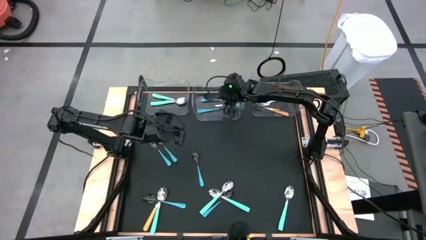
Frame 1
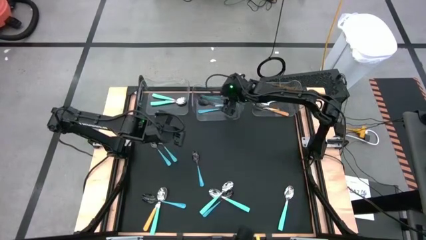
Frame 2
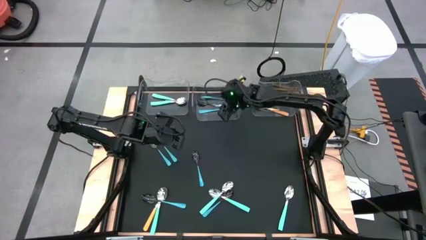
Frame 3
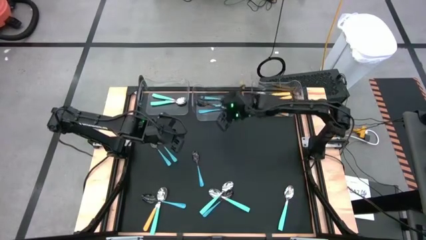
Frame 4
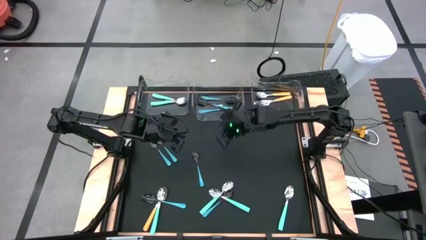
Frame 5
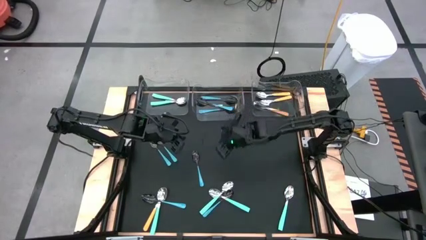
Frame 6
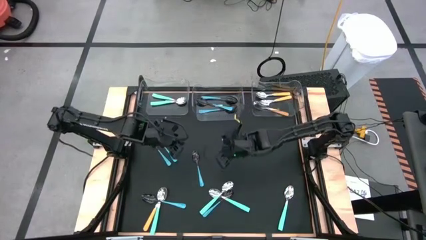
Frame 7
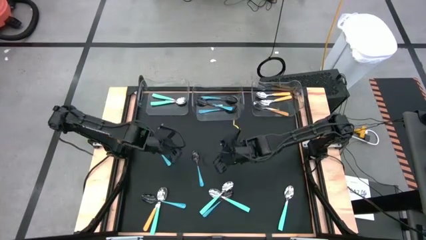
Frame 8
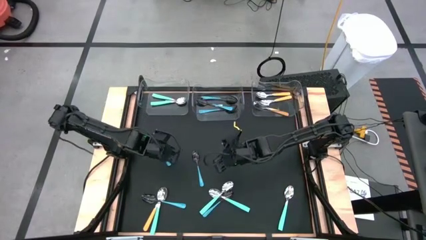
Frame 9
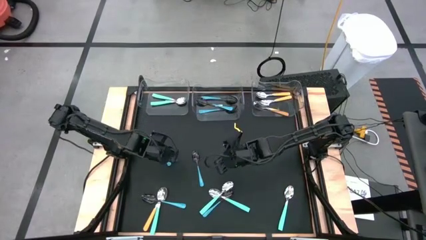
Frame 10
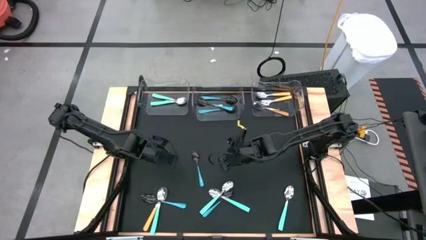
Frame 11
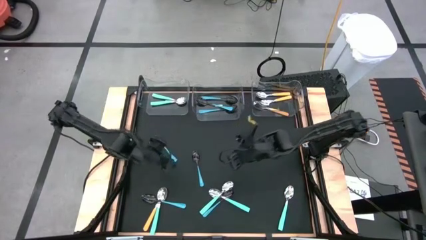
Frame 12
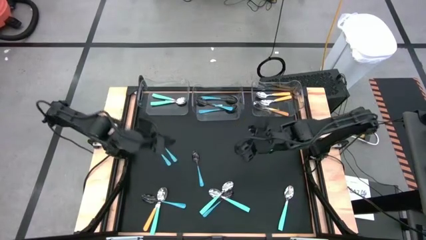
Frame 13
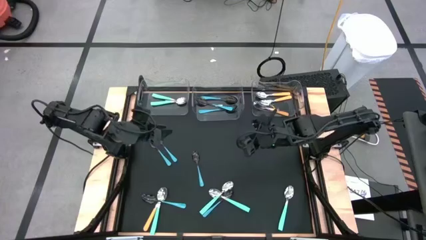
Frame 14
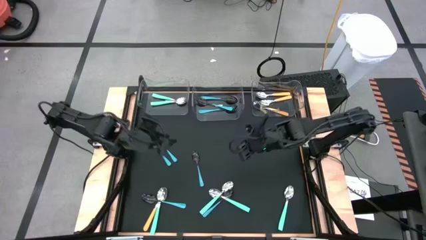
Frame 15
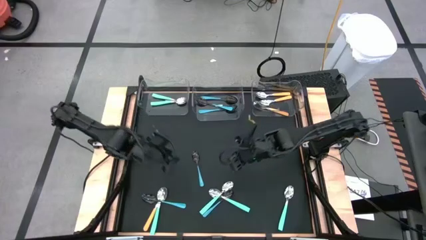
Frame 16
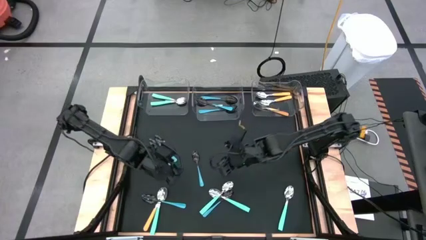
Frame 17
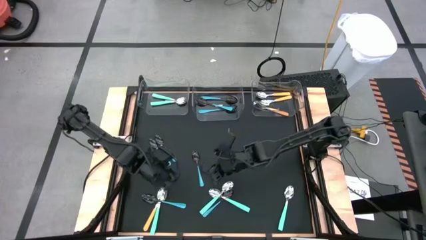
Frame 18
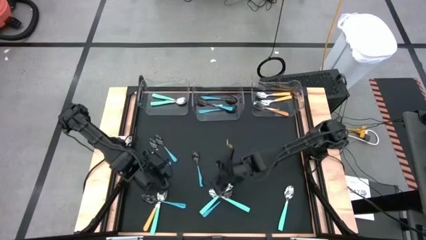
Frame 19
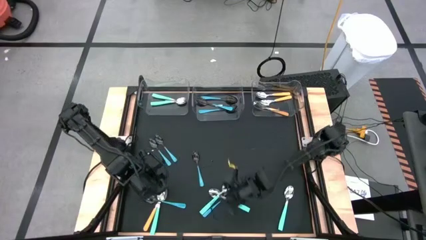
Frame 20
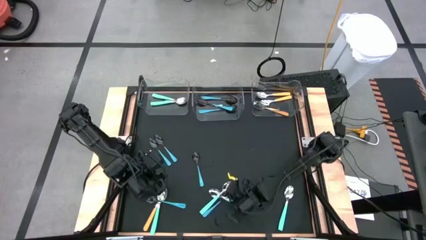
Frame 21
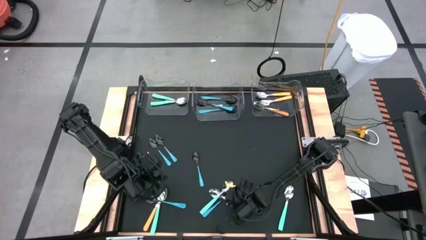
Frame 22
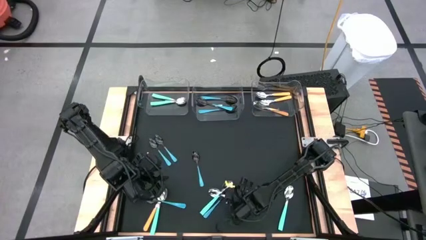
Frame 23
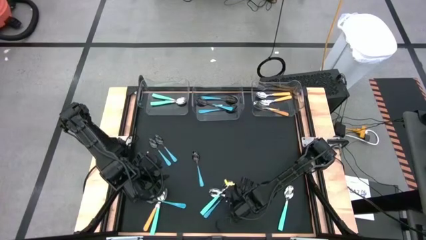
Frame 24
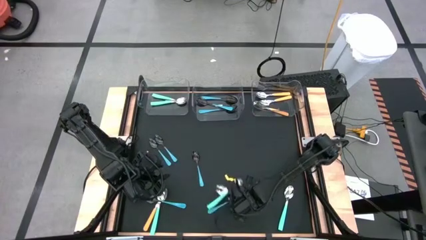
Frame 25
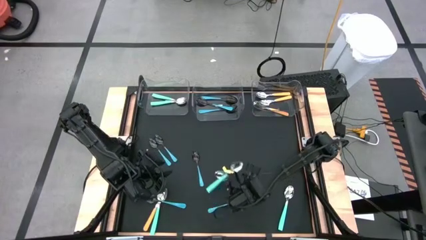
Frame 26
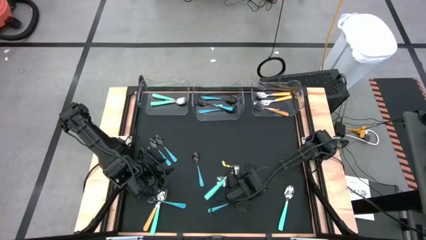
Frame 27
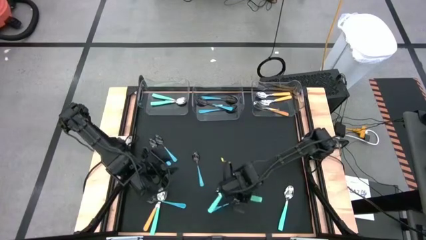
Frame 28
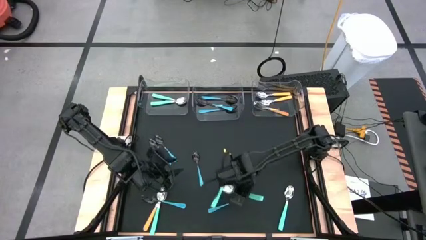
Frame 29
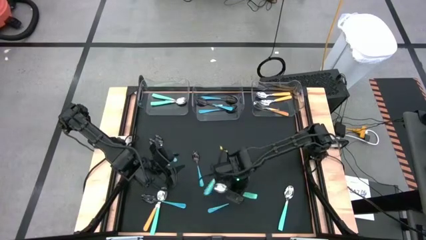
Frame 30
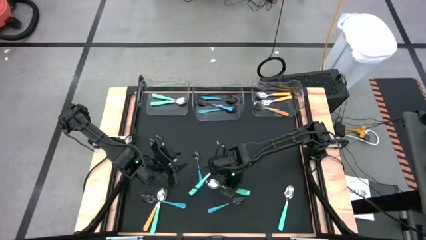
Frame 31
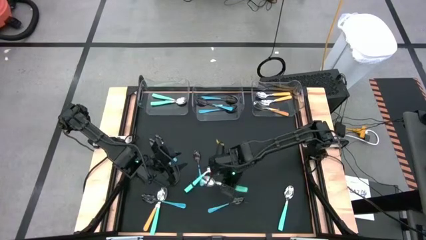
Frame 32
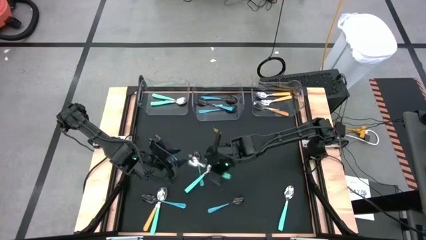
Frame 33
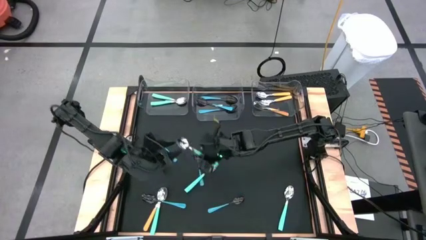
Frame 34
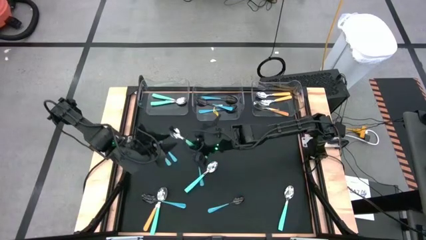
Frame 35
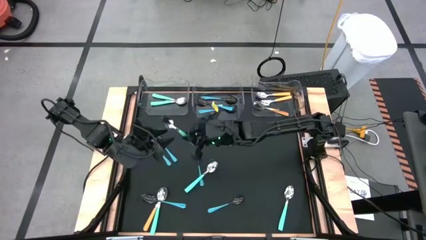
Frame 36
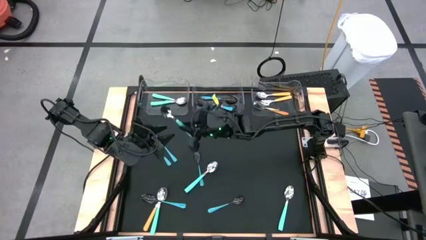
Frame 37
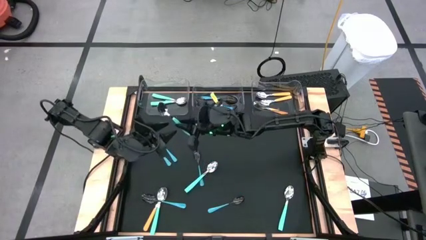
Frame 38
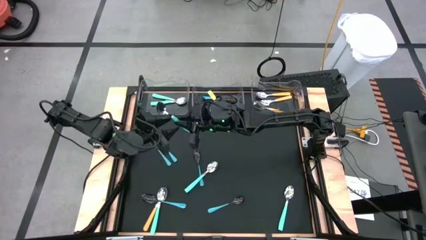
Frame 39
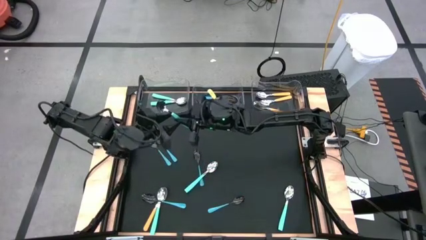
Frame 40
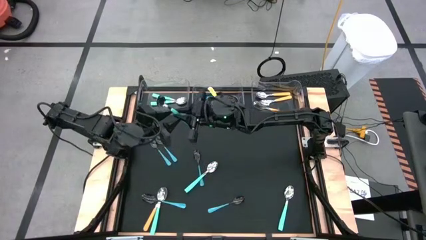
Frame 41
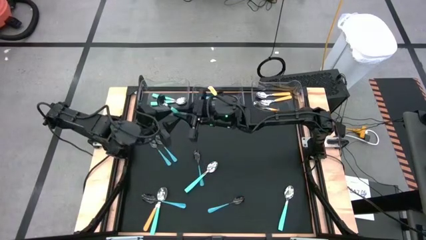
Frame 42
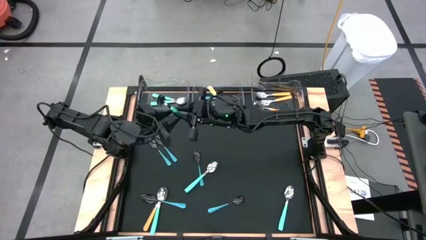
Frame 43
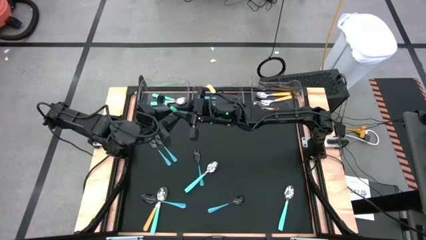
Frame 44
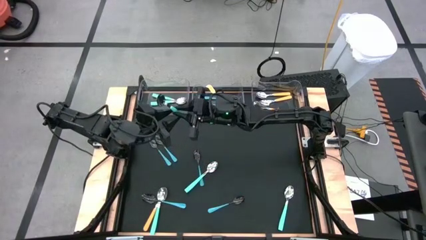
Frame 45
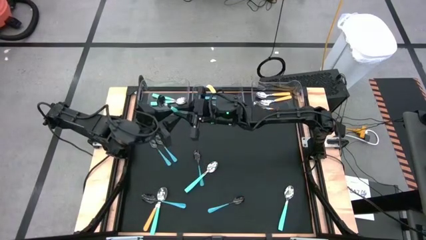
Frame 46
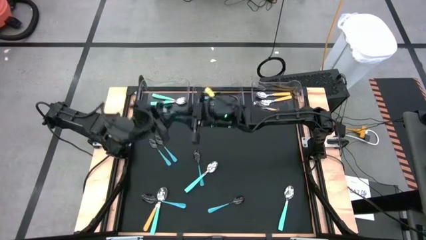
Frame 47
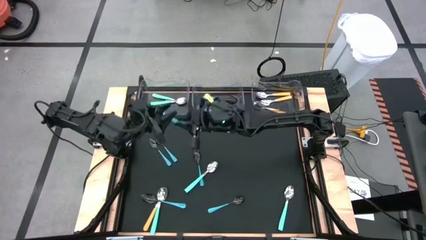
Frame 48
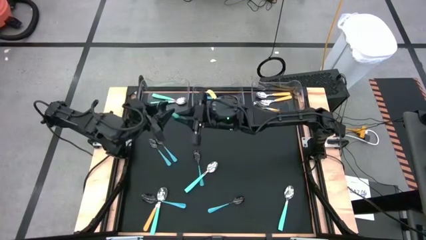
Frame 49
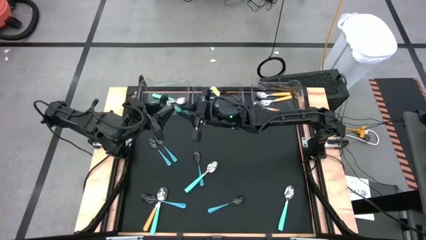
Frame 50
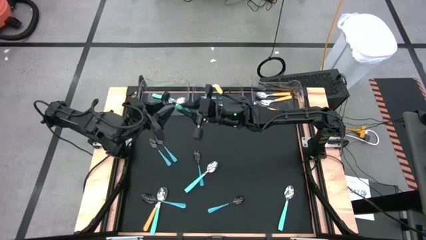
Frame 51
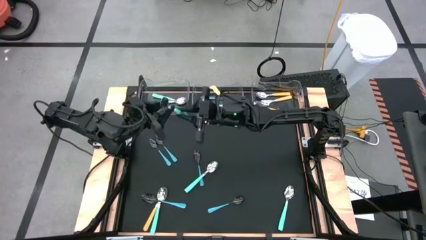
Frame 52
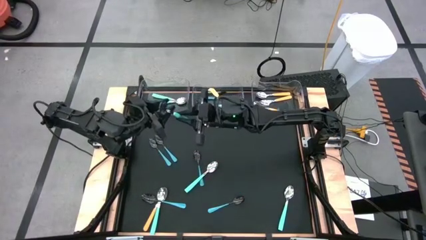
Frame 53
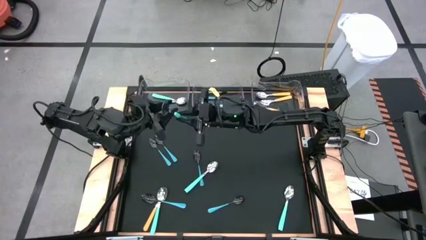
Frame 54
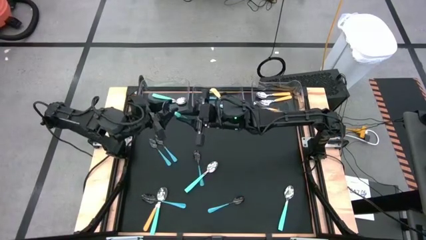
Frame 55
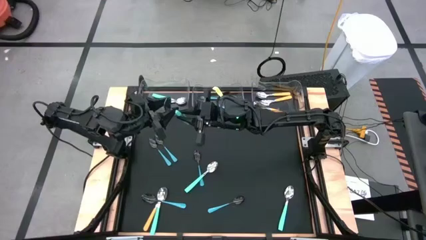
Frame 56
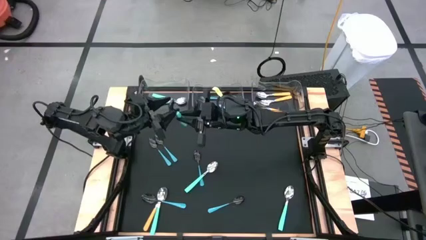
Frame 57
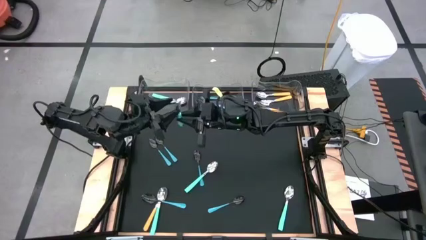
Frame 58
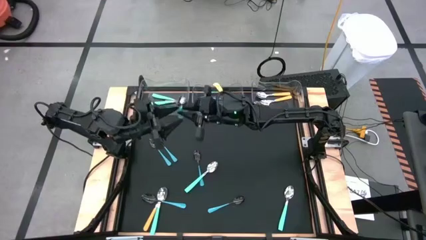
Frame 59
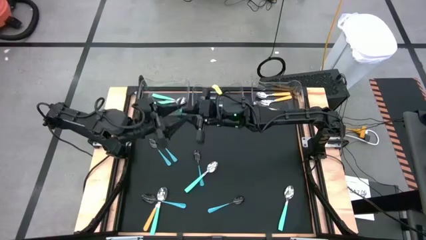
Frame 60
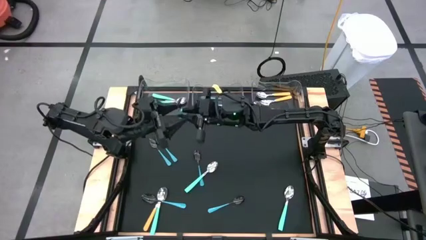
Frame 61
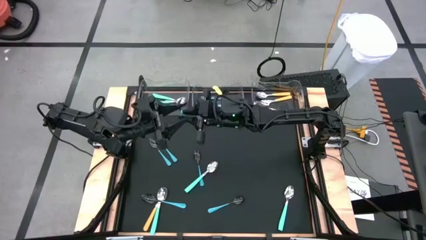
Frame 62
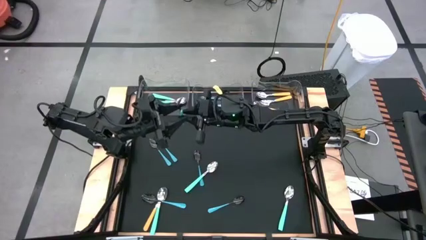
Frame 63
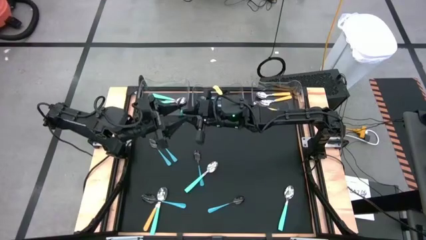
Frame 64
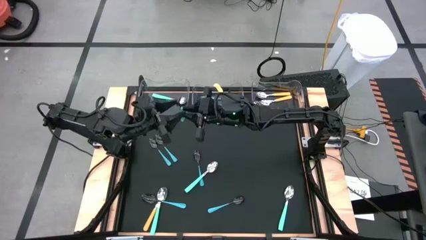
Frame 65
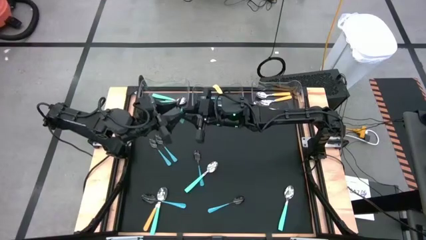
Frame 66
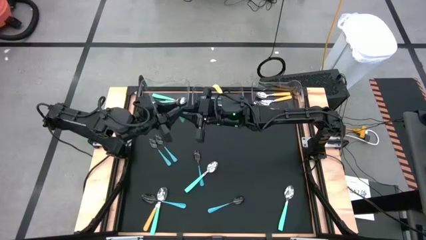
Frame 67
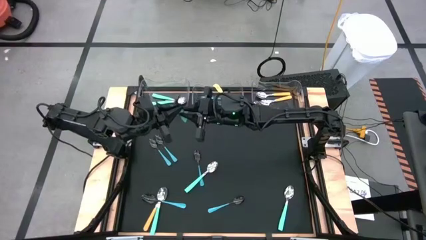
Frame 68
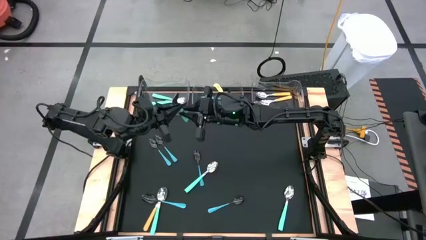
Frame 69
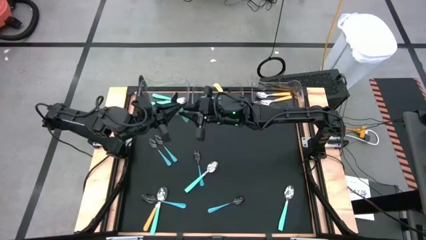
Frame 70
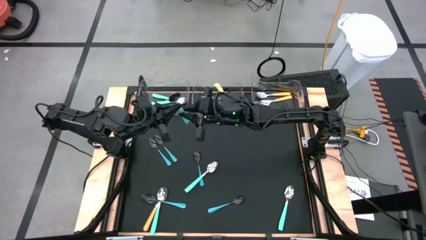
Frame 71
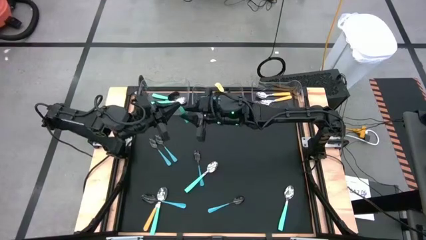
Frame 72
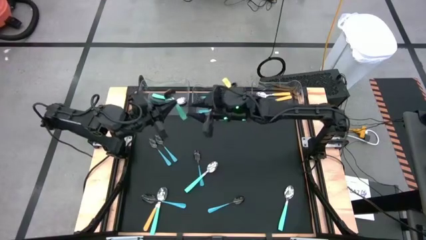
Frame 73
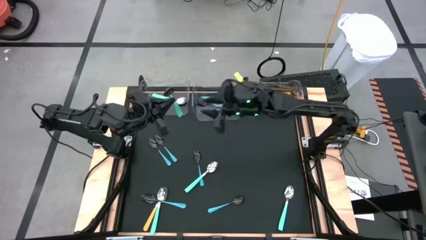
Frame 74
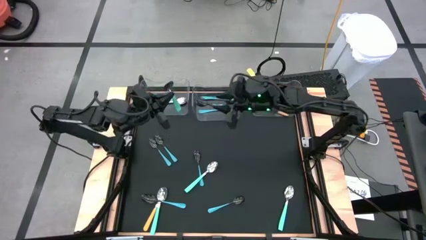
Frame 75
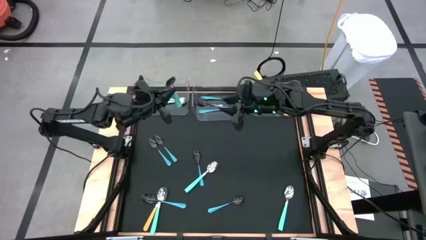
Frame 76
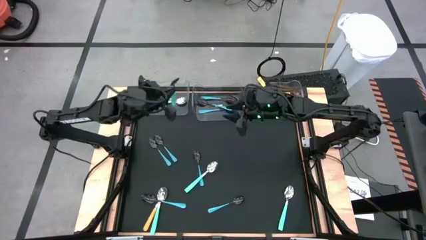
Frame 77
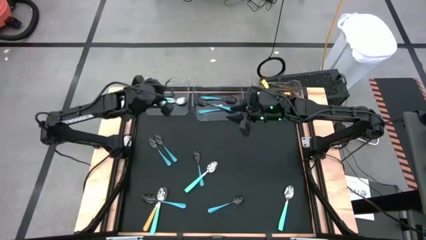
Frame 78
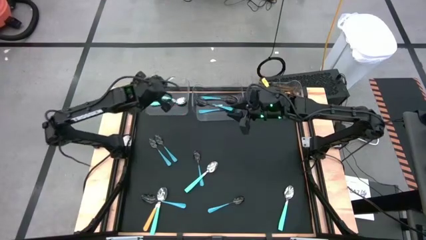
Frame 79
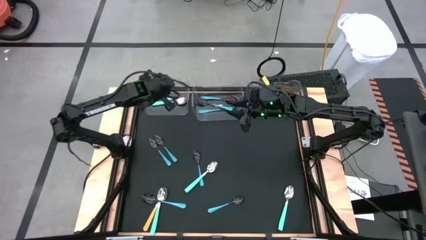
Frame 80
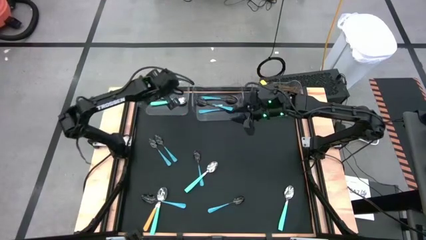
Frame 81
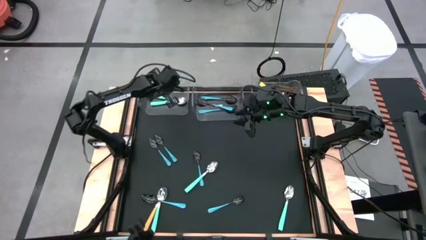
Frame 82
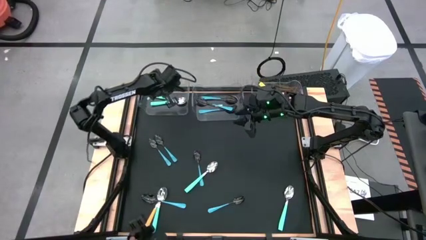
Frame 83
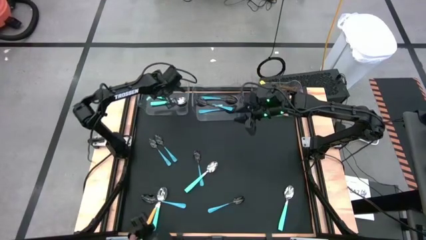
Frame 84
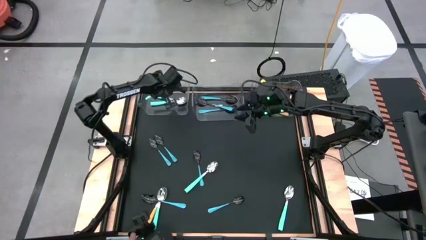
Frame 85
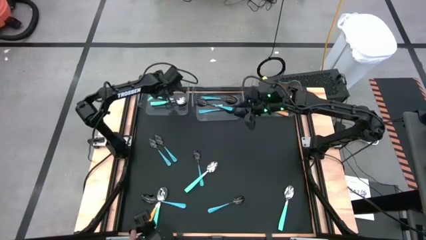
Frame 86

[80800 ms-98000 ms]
Task: Sort silverware by color (type)
Put the light blue spoon into the left transparent bin
